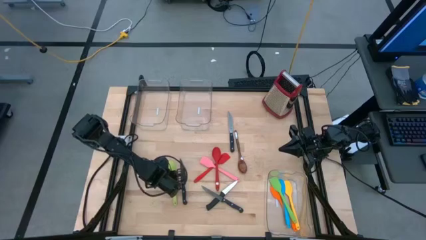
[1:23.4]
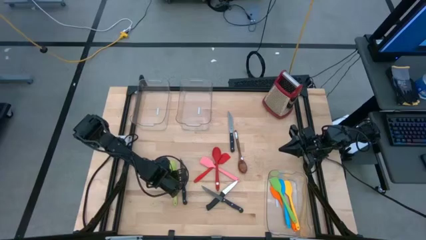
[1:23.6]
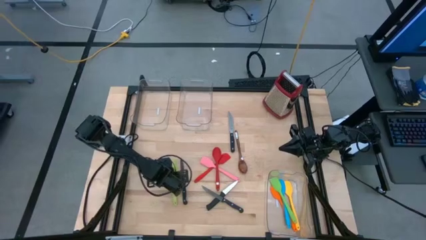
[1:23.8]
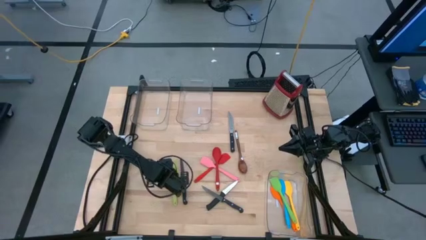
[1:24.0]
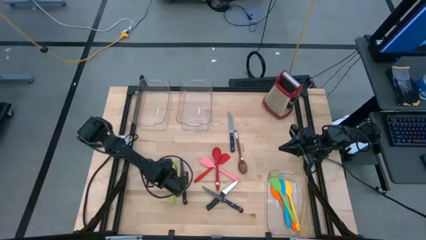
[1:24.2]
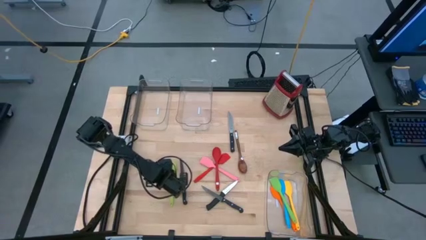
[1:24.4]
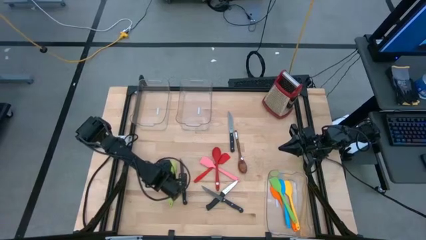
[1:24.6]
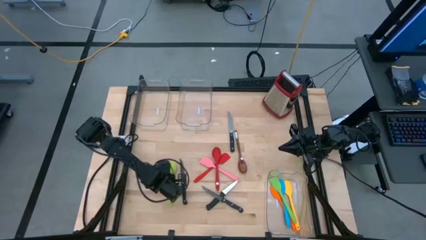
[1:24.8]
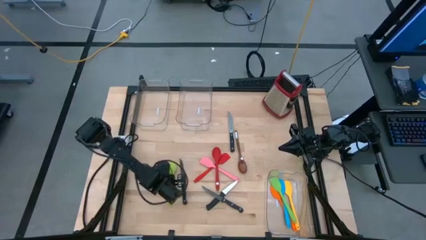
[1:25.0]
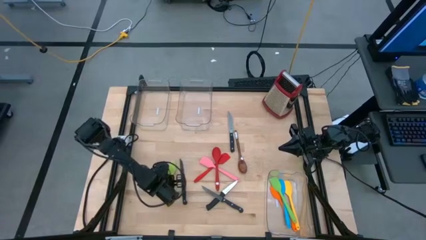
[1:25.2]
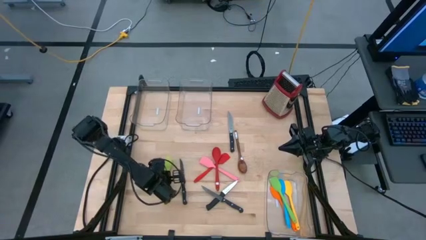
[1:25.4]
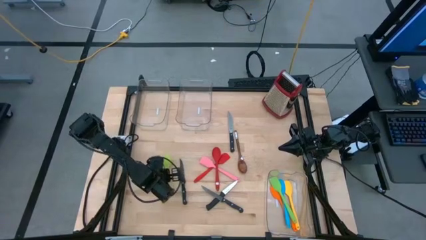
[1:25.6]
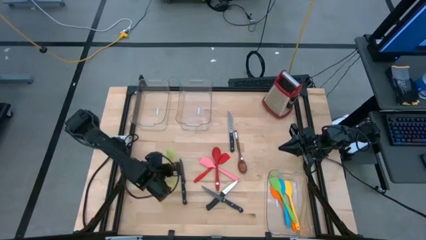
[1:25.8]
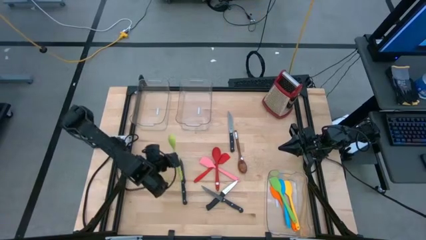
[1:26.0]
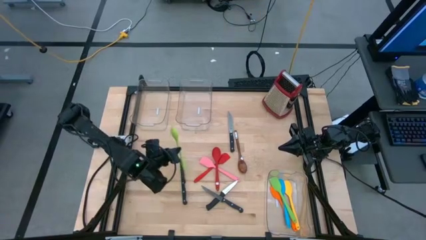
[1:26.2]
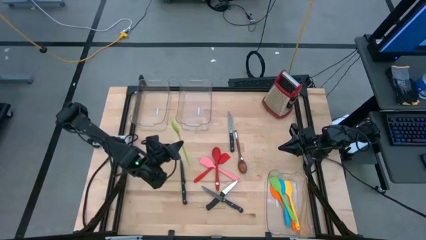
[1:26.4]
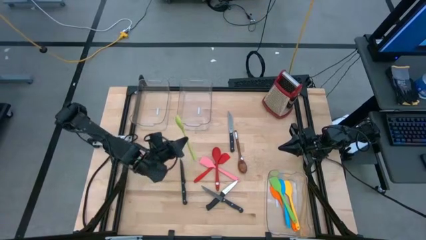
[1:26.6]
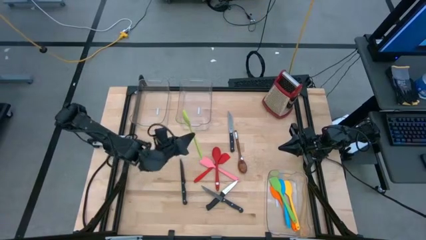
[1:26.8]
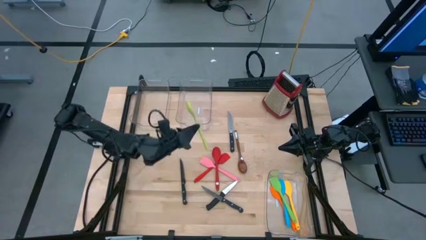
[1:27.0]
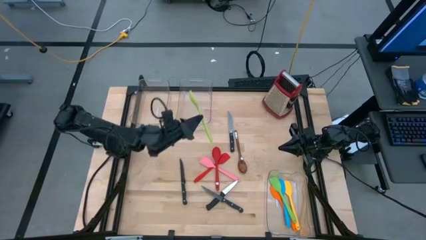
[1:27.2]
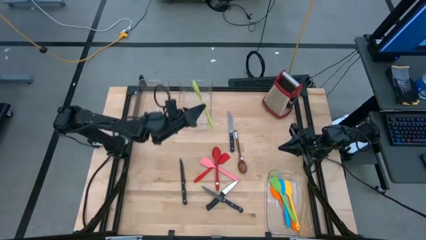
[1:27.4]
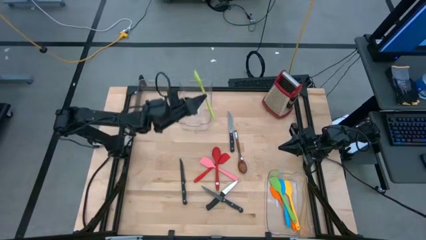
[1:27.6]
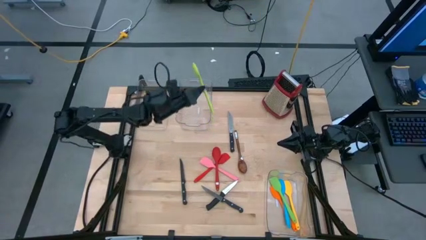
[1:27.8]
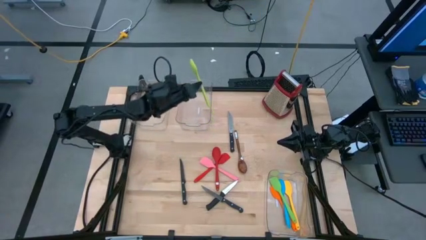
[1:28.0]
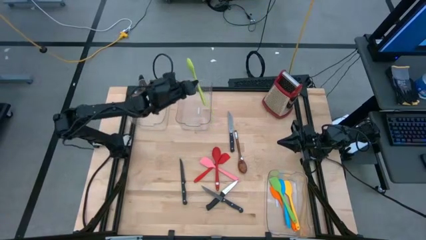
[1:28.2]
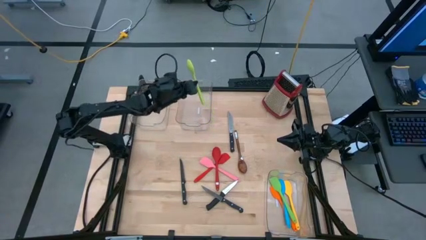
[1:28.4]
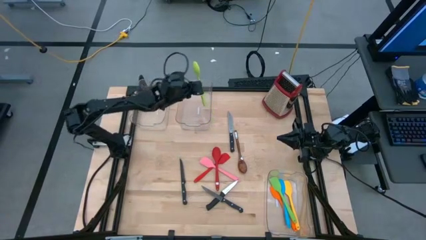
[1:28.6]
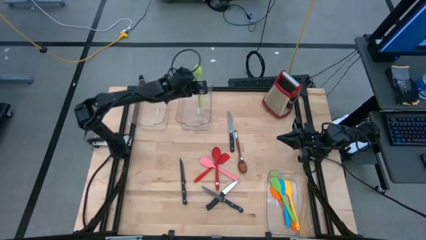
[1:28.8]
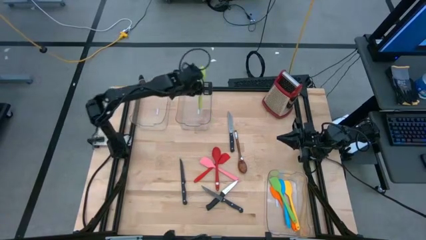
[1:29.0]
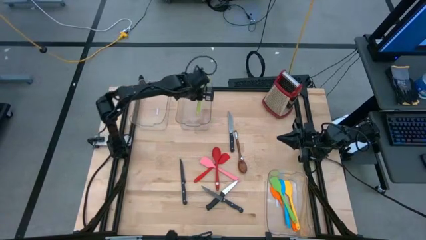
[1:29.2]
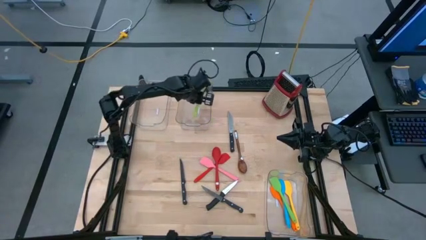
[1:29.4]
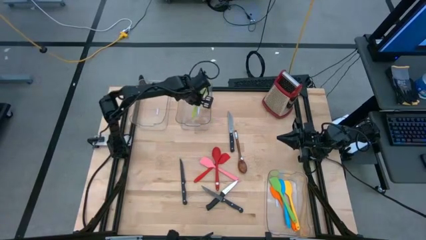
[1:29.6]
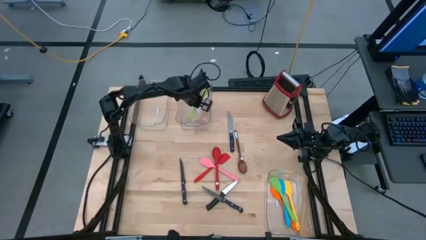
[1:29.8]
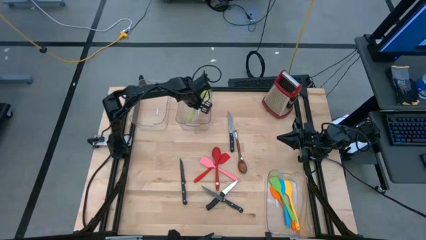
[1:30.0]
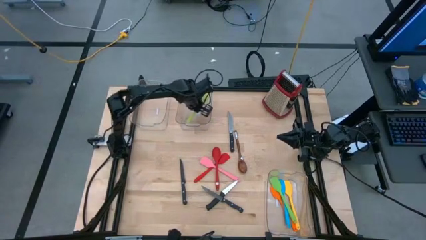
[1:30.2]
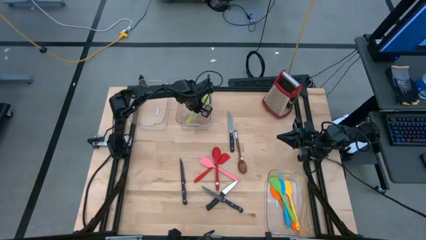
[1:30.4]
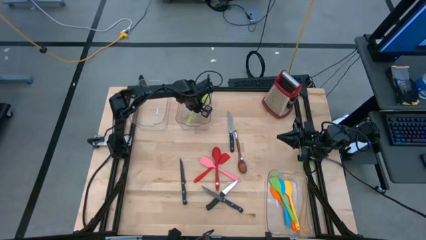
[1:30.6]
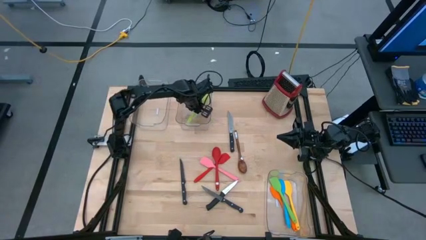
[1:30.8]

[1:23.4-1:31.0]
Task: Pick & Place Kitchen Items
Put the light green serving spoon into the top right transparent bin

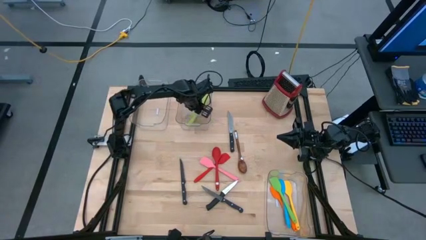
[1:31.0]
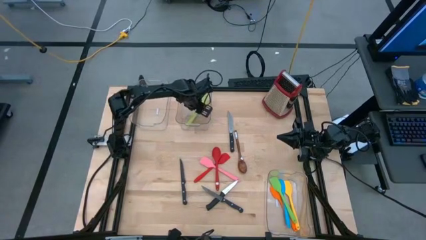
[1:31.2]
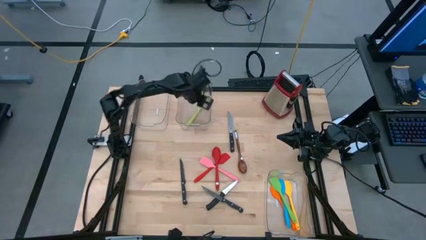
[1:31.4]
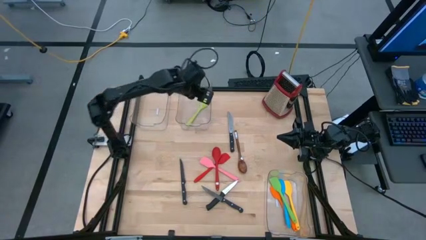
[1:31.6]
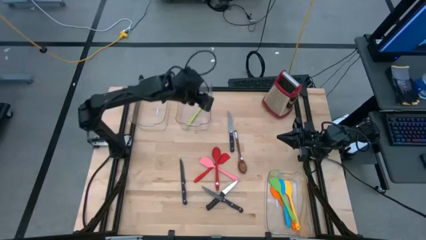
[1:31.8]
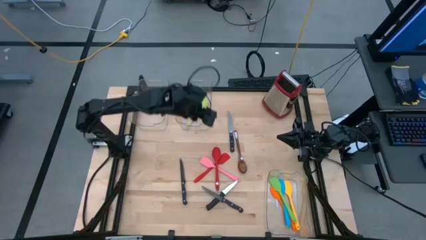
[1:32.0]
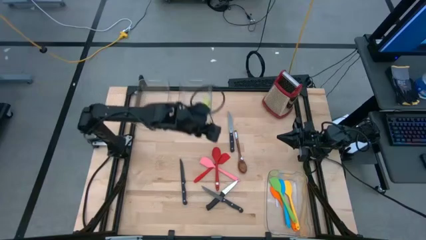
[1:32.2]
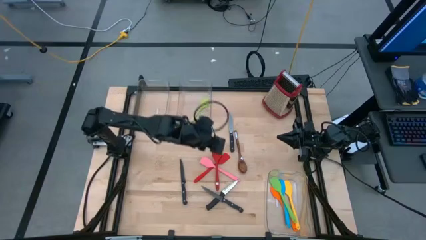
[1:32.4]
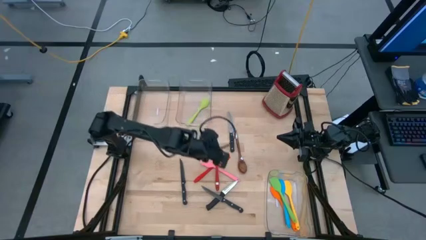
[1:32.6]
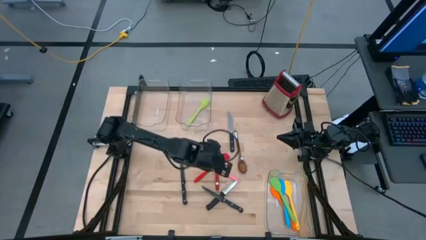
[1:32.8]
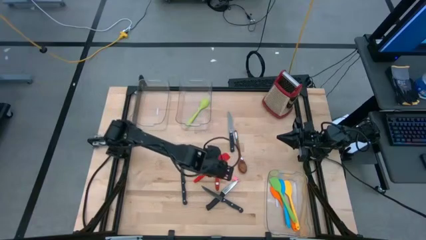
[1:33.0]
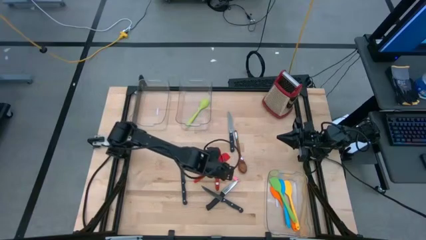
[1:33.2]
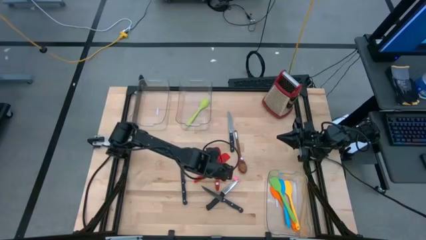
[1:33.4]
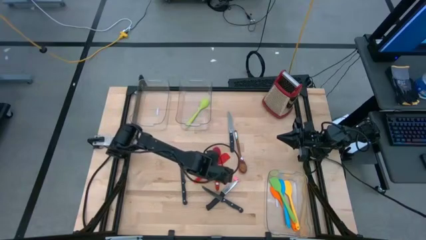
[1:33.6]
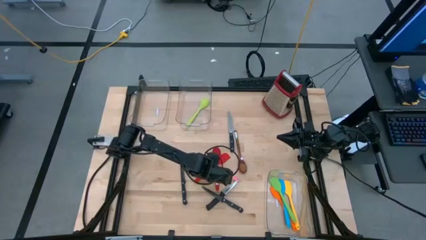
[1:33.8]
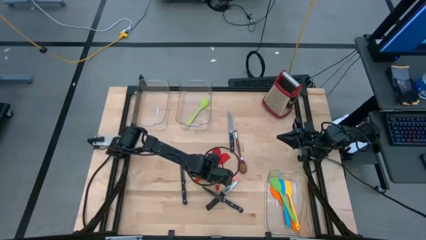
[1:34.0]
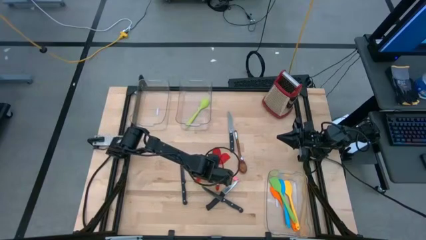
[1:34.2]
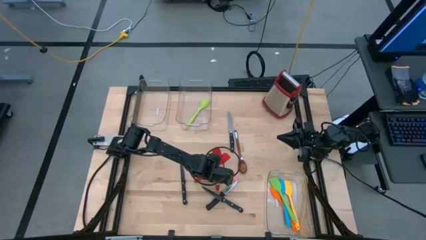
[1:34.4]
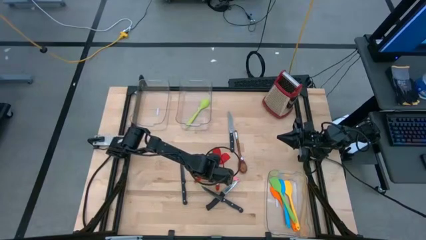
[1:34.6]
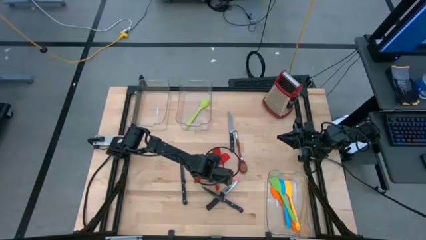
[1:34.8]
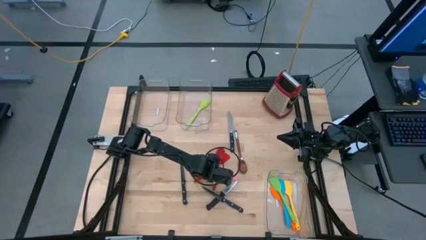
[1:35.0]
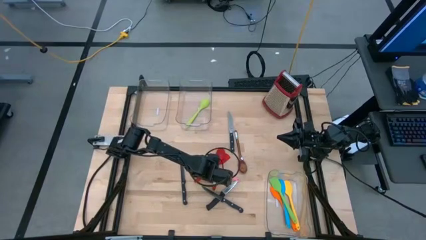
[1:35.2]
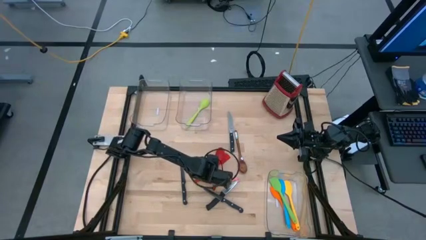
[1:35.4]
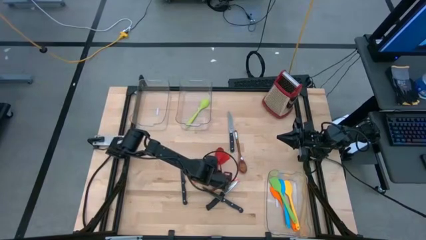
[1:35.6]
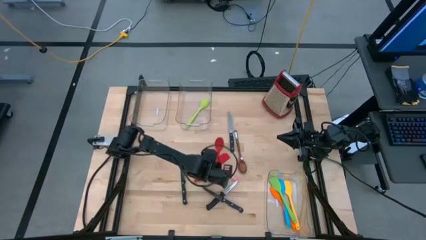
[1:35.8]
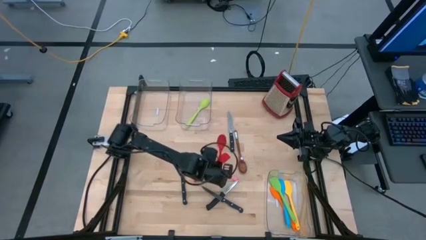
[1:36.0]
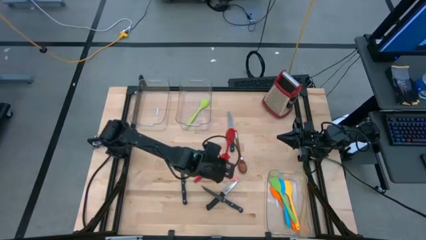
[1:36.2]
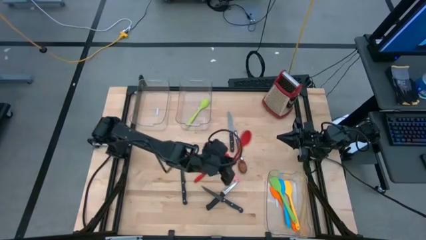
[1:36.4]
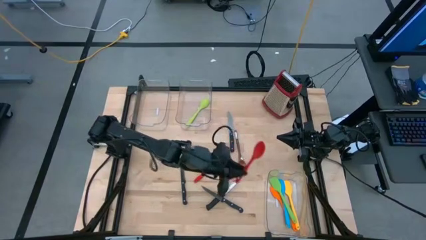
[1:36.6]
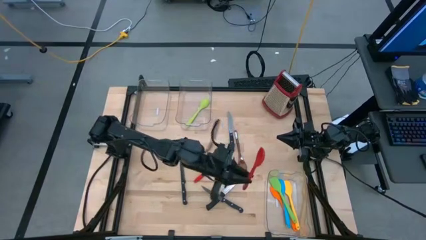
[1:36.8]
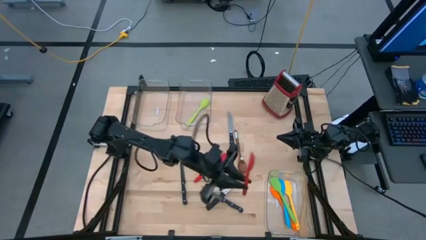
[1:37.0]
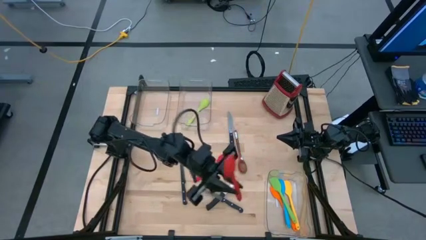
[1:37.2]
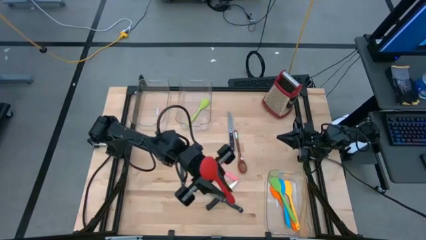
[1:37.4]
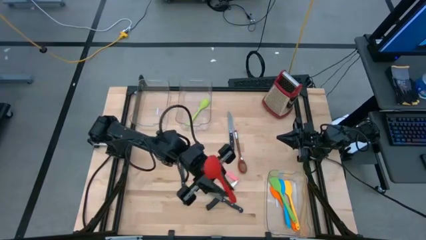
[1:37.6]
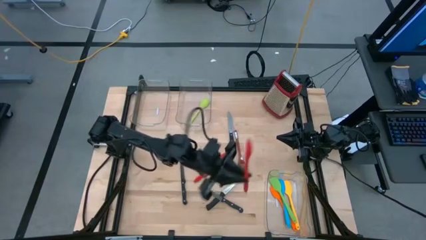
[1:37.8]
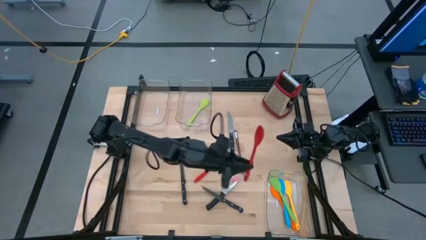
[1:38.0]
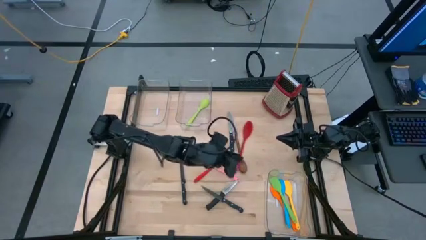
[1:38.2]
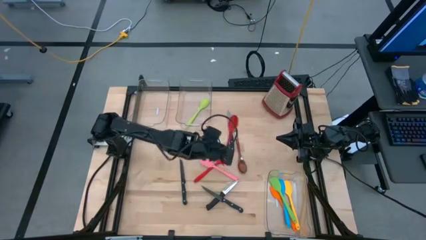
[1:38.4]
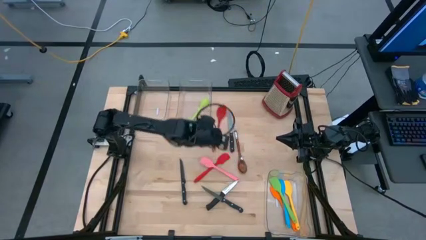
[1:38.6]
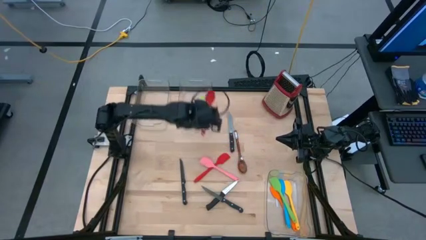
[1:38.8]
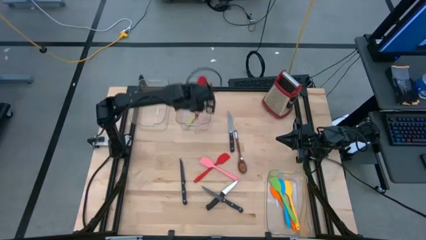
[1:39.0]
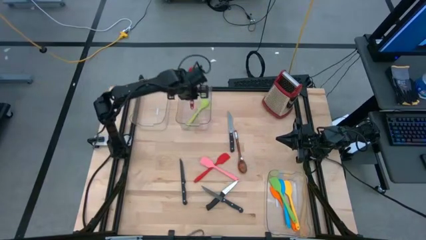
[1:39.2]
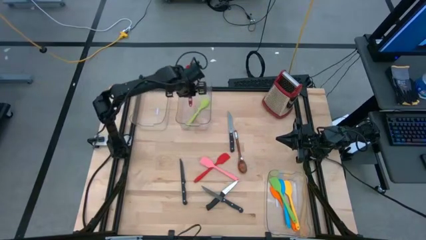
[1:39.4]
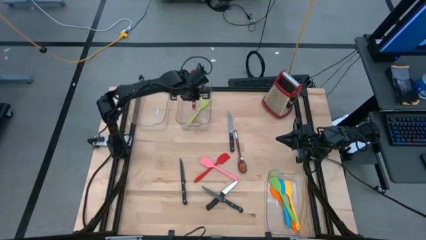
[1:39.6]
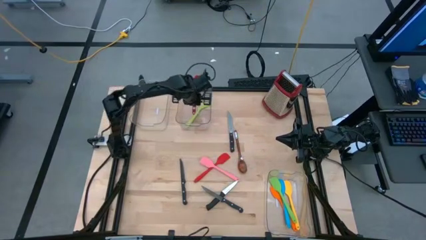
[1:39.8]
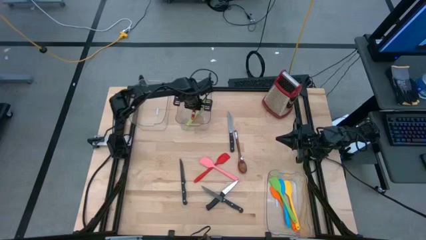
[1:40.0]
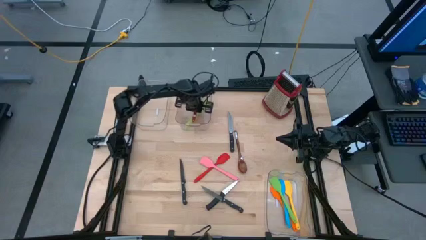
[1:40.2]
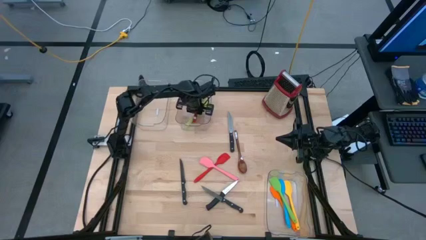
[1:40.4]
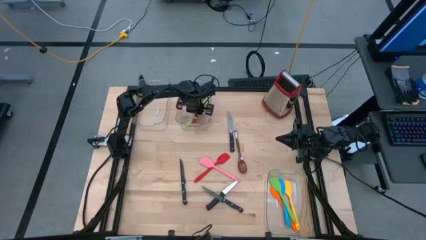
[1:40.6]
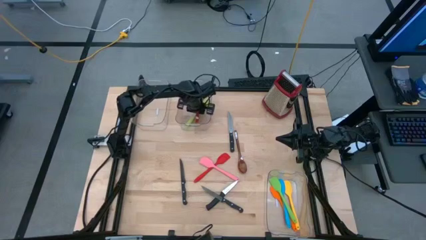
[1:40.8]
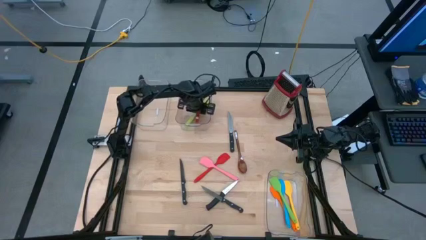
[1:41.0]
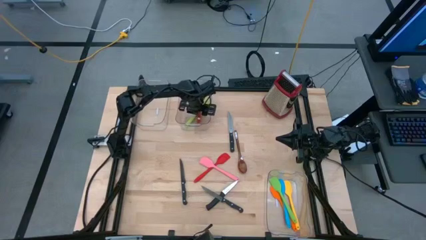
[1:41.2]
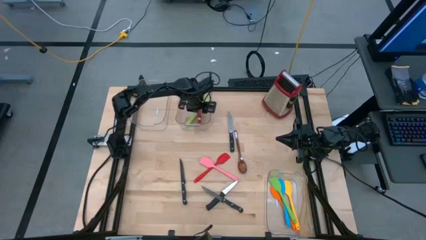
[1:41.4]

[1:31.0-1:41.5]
Put the red serving spoon into the top right transparent bin
